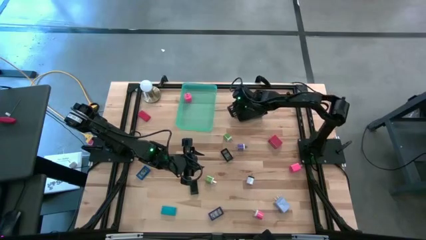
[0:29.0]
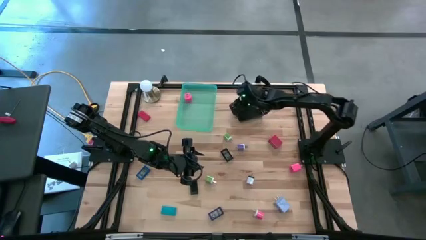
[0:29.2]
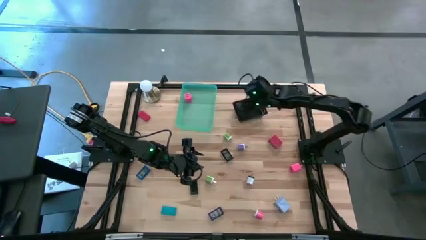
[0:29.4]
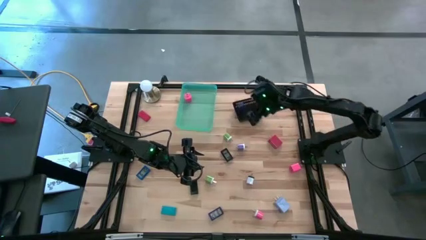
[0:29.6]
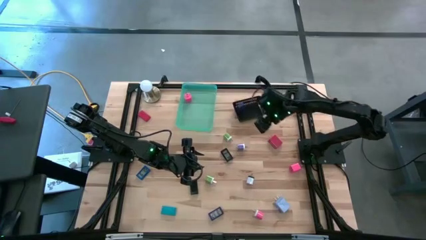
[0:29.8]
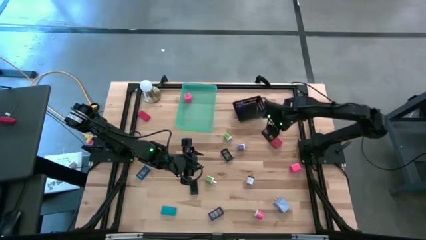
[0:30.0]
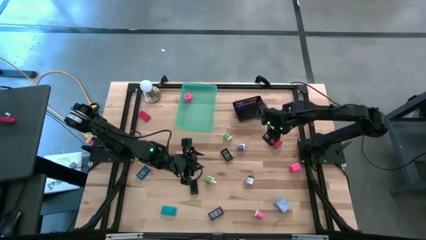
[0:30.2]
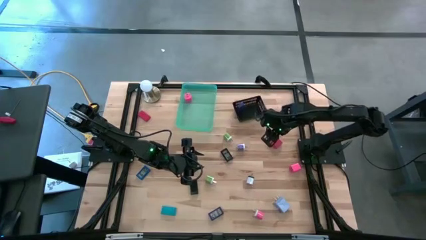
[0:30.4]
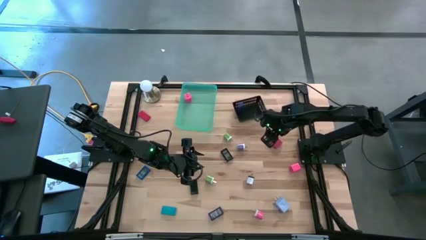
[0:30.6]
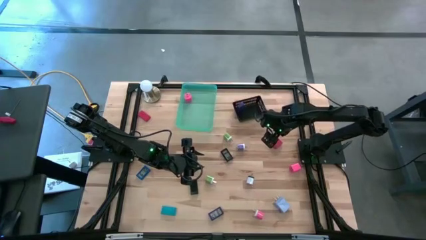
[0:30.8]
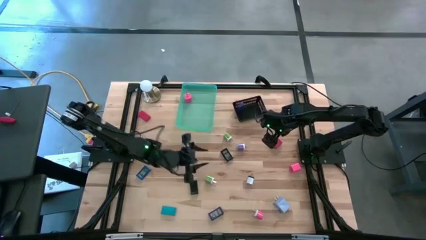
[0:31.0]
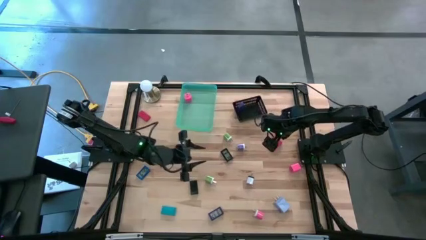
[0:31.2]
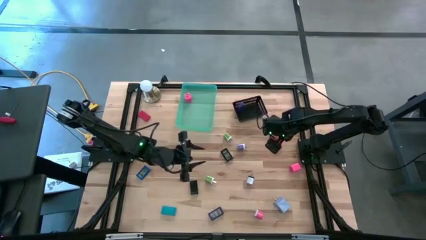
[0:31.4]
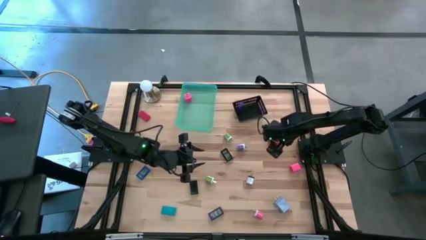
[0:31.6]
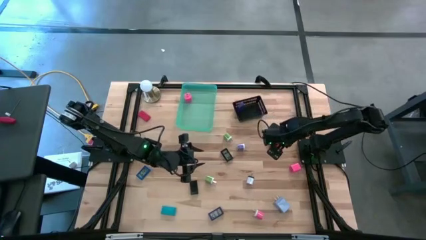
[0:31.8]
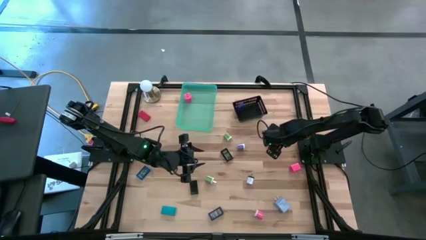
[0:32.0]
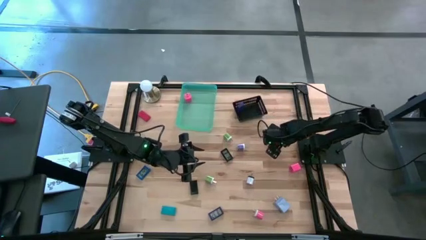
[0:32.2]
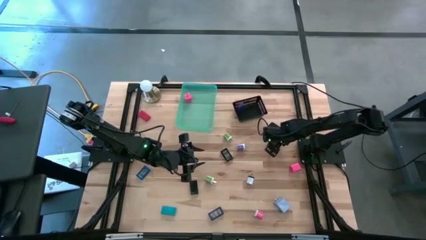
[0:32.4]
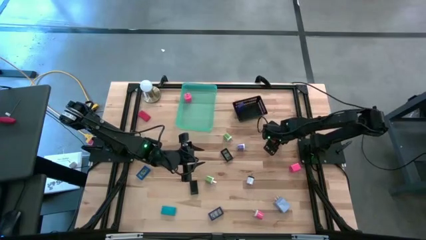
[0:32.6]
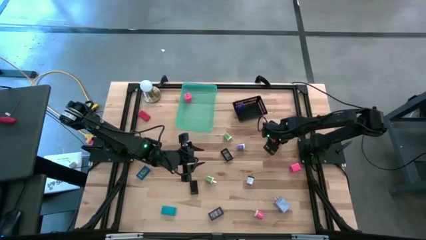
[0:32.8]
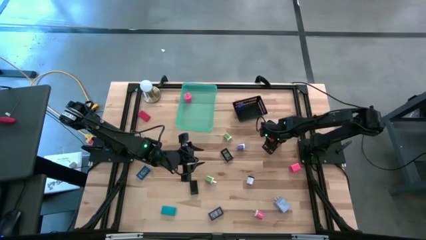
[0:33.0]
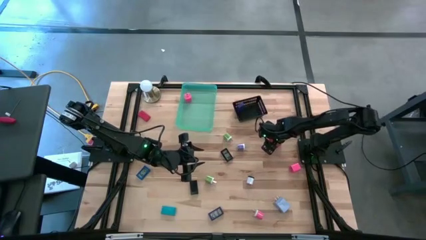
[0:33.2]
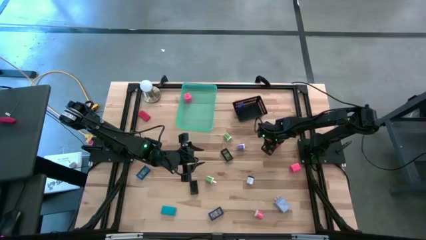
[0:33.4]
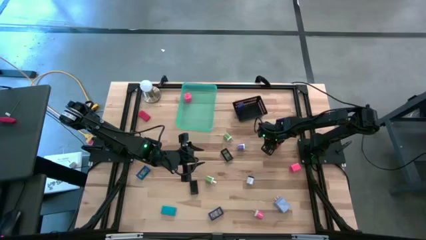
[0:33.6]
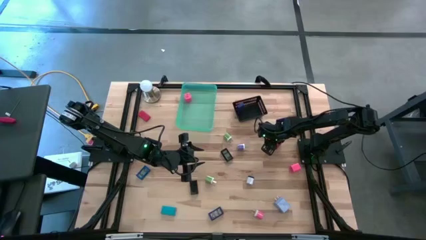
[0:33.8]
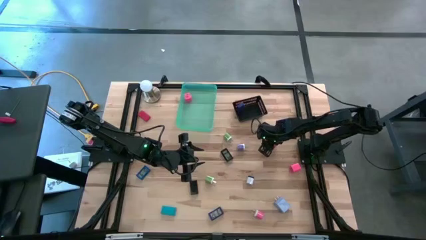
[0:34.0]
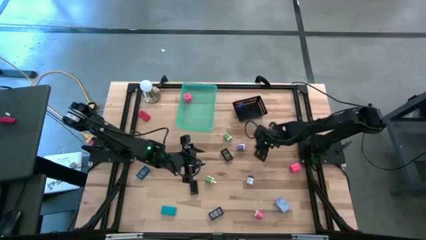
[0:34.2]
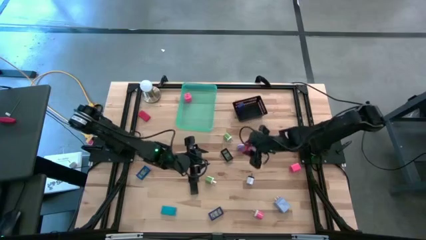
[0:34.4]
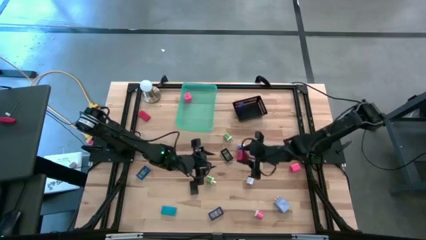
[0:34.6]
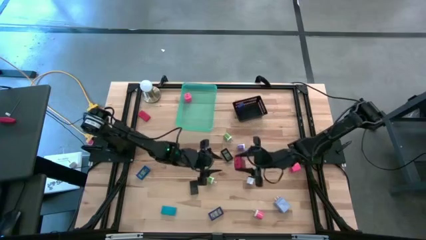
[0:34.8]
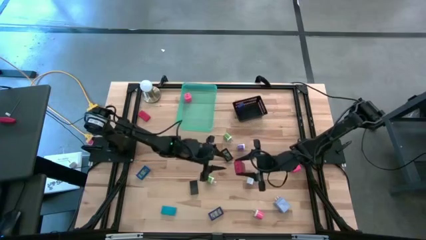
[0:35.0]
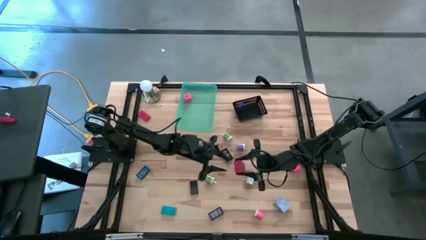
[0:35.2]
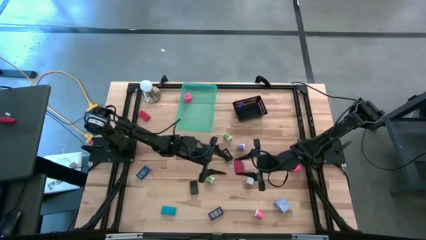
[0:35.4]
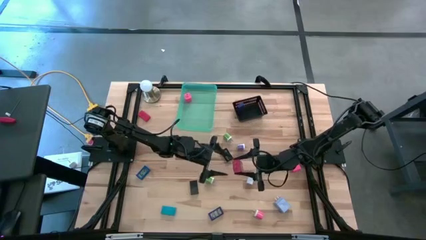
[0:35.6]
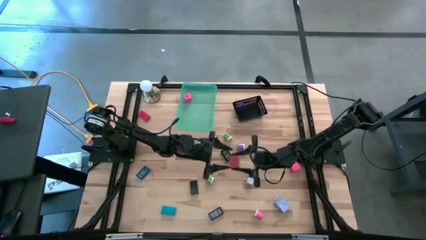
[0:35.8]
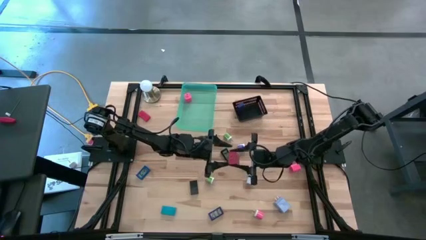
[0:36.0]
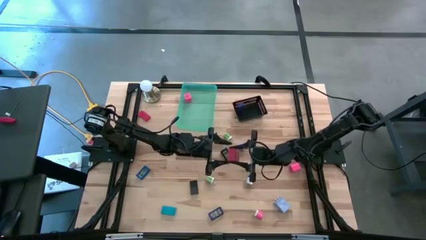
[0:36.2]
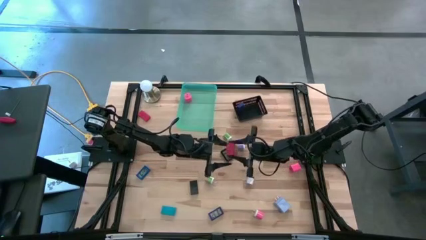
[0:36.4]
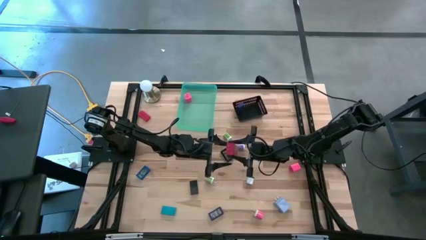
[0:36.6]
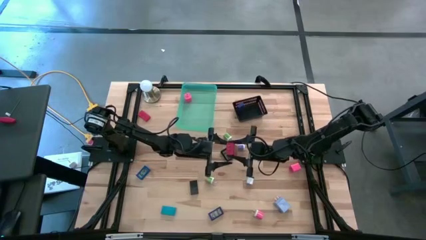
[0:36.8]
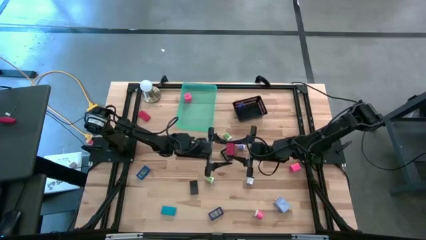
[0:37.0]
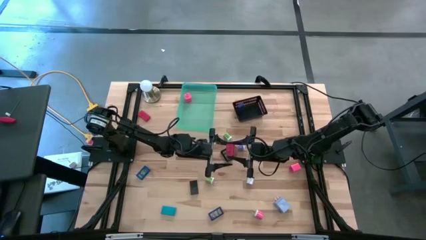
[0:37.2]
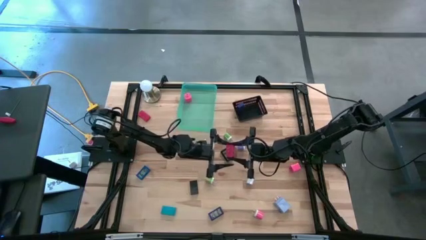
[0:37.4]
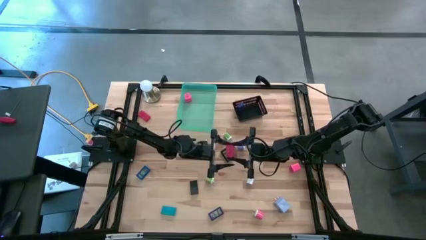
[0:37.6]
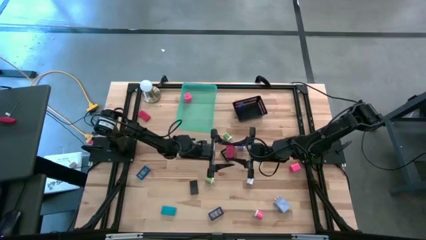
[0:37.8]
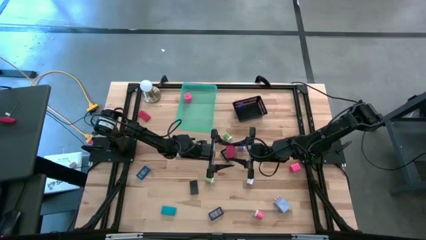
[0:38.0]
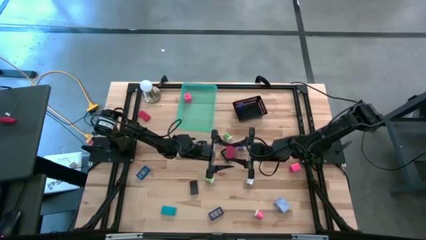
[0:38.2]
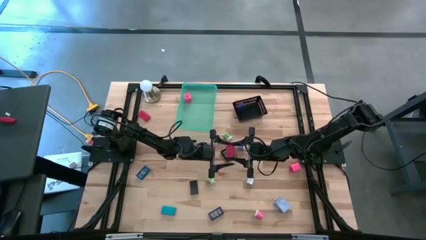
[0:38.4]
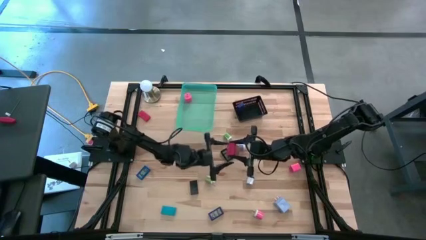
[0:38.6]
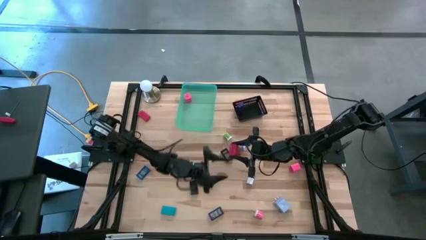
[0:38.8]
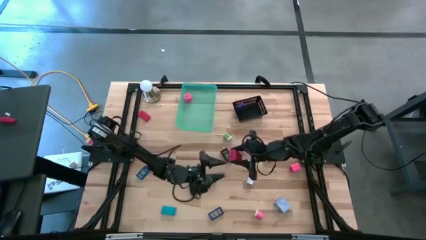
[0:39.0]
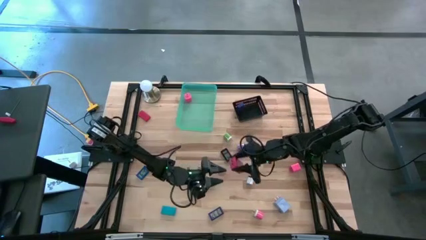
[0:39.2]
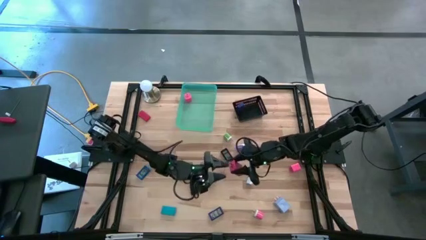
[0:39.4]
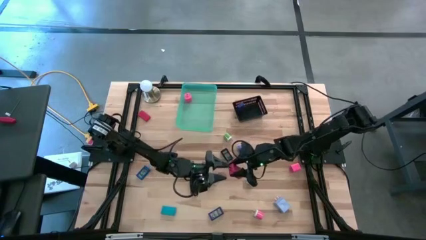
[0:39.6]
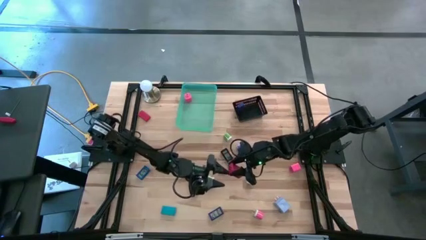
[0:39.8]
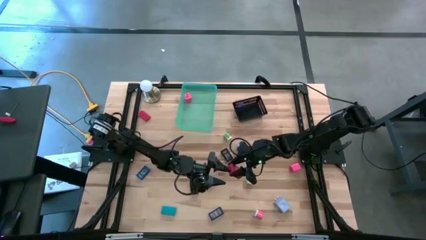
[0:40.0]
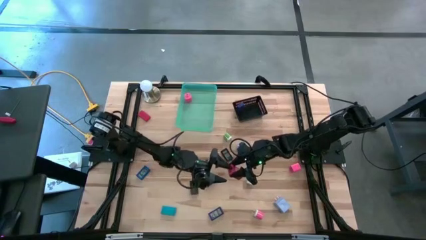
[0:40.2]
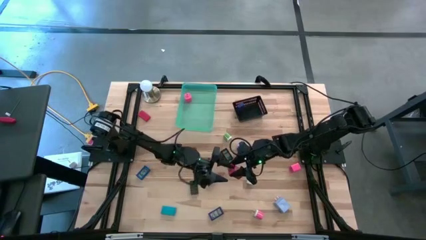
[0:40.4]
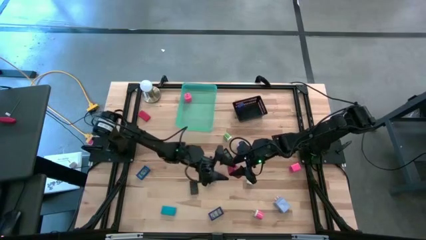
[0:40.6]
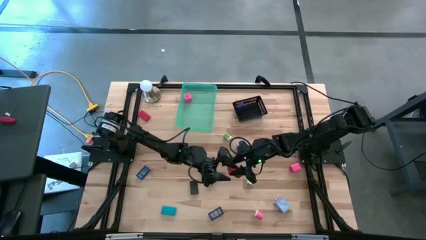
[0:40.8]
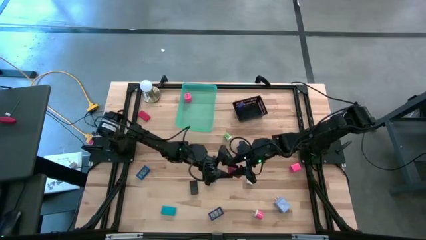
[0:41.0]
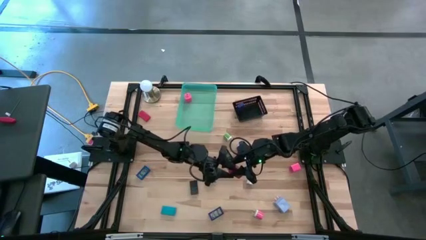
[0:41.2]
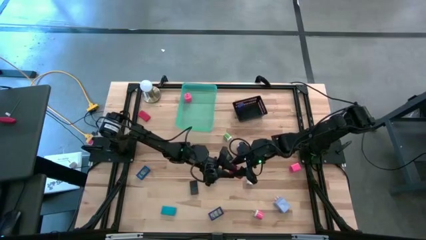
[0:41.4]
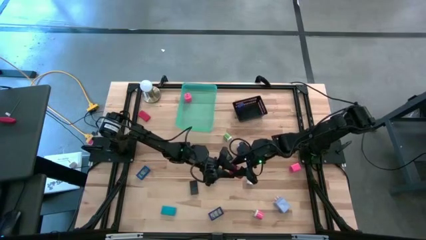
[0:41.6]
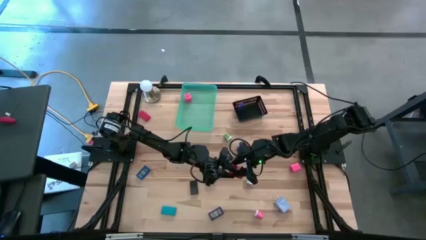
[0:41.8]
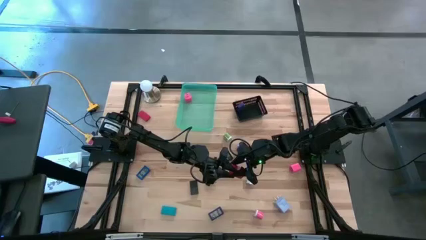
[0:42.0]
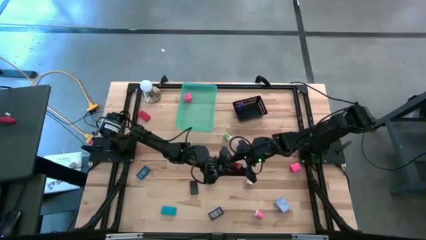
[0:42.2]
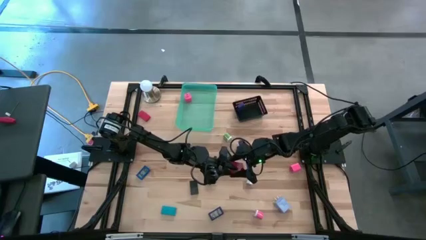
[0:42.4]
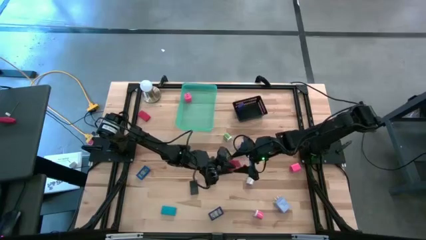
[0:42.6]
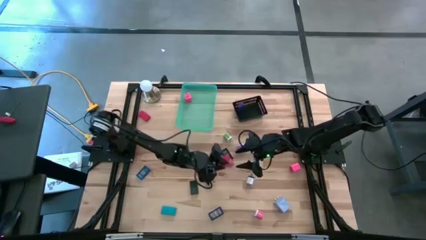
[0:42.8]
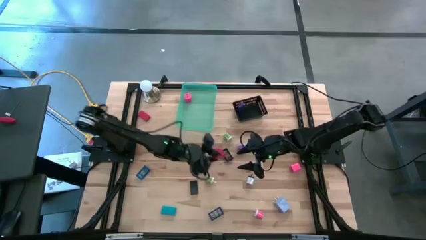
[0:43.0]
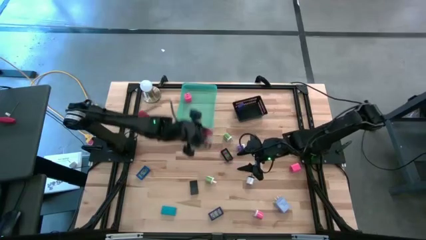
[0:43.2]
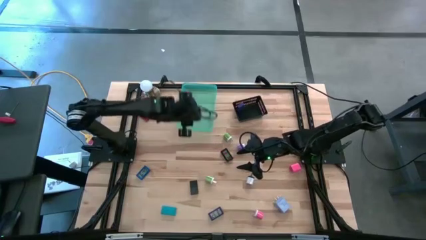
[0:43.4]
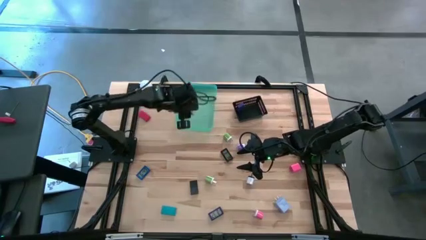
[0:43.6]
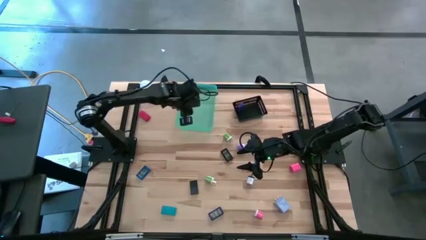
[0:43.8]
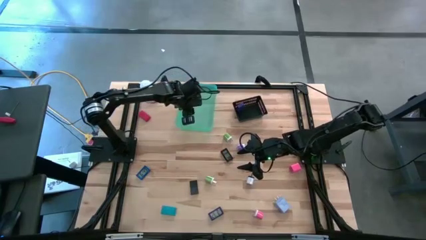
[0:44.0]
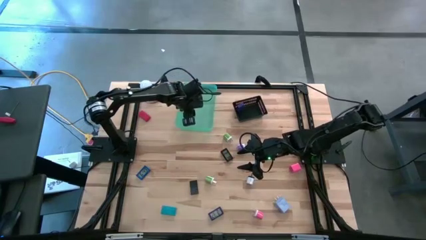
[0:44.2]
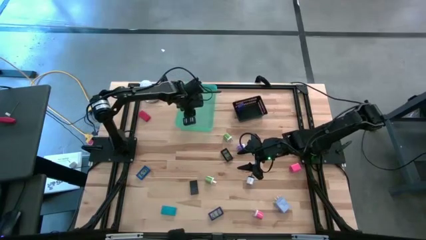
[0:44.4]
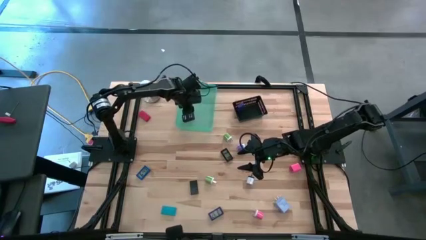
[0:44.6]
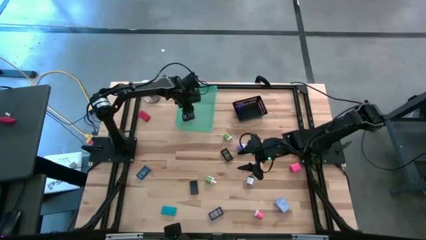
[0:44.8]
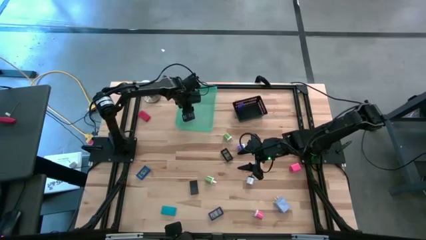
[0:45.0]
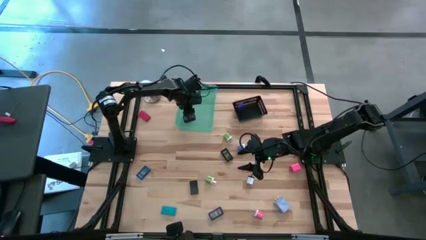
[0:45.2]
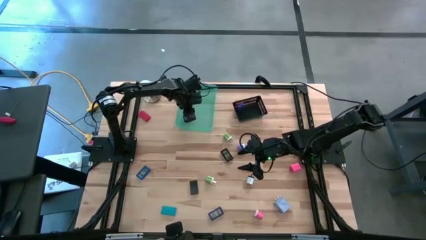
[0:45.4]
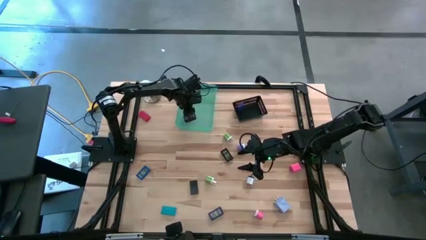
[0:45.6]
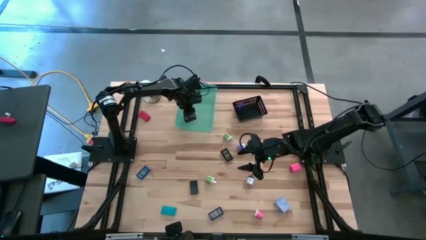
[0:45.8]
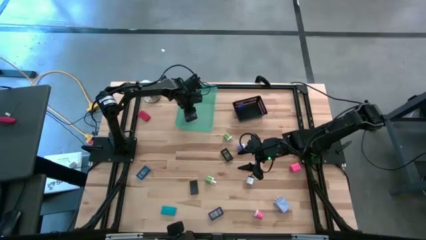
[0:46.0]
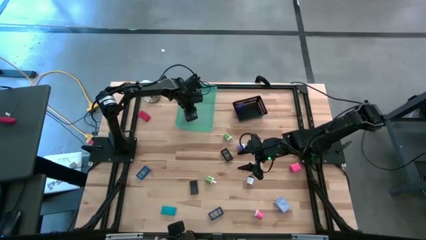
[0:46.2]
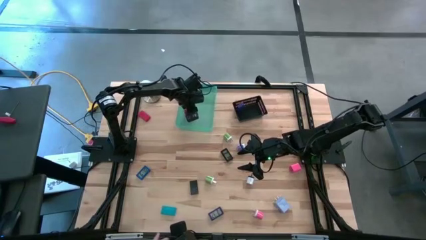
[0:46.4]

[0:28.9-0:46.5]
Task: Pick & Place Office items
Put the red charger adapter into the green bin
